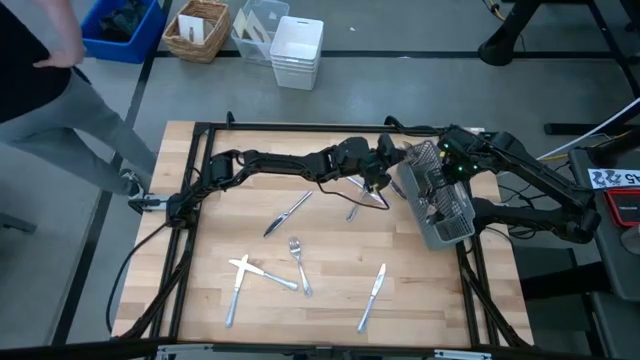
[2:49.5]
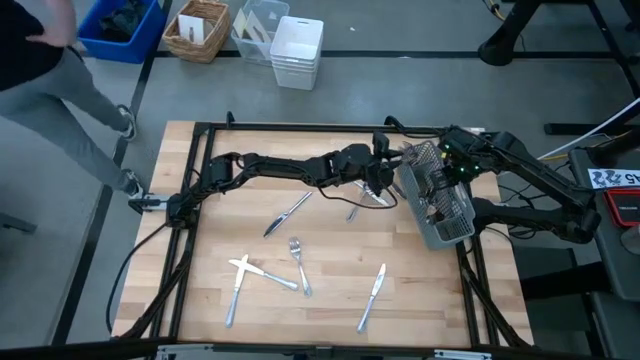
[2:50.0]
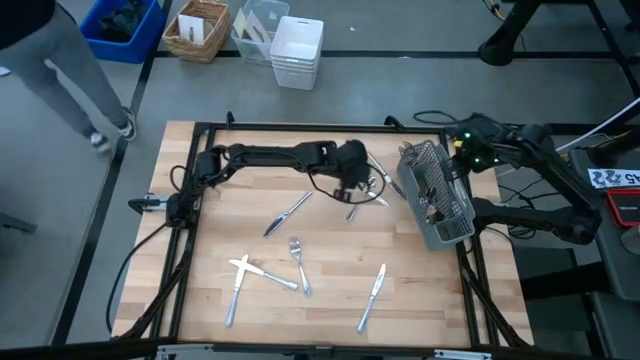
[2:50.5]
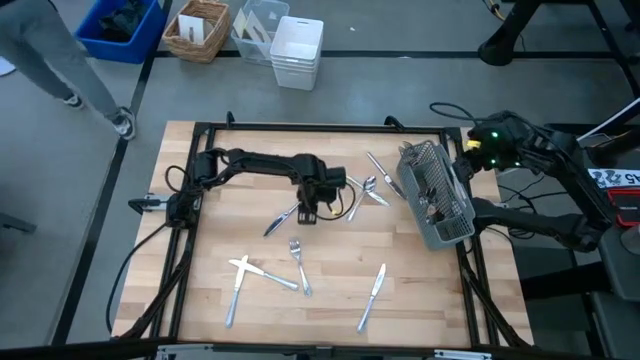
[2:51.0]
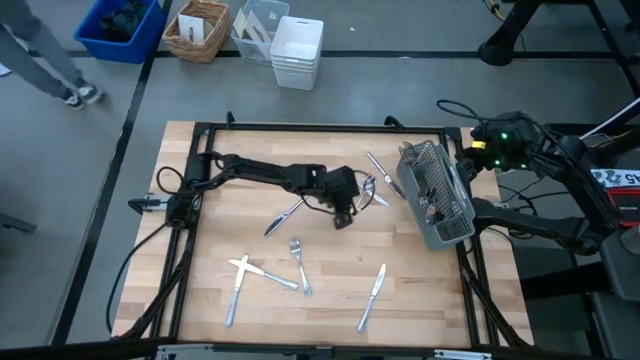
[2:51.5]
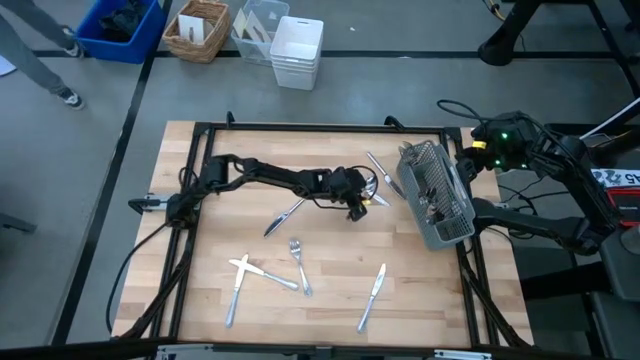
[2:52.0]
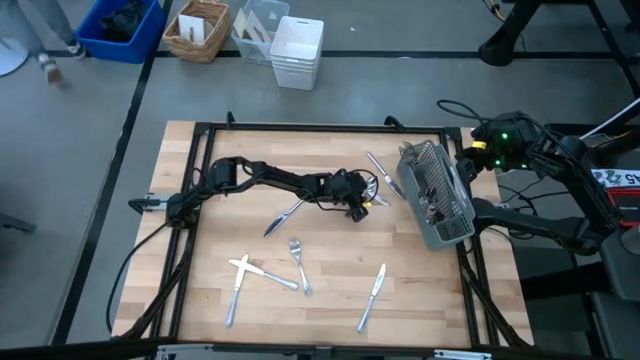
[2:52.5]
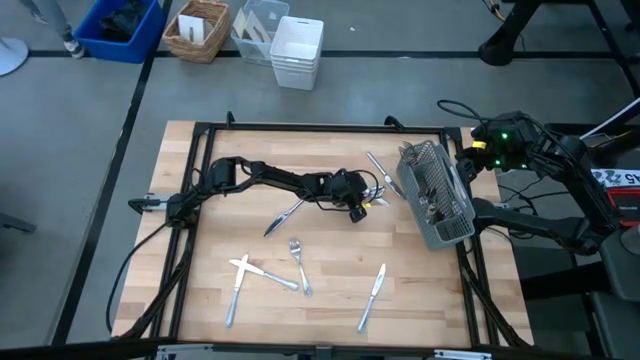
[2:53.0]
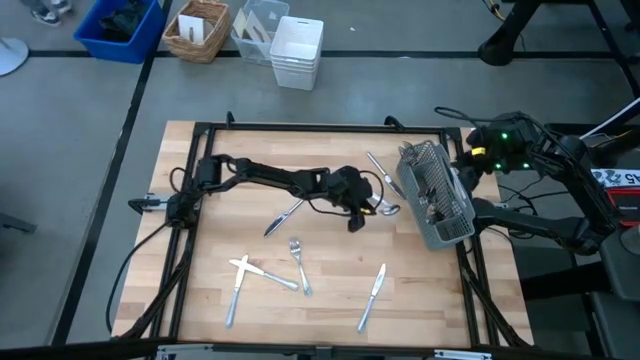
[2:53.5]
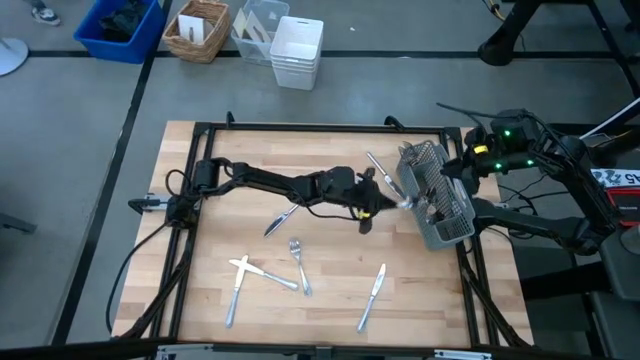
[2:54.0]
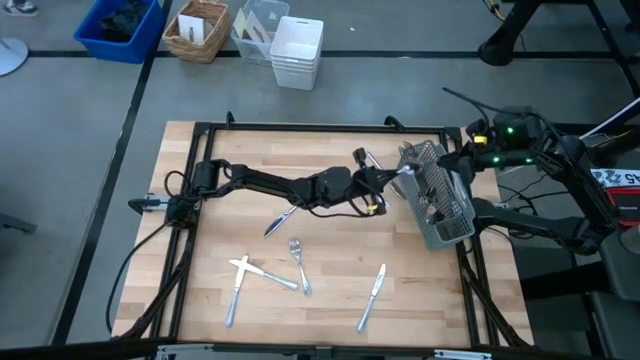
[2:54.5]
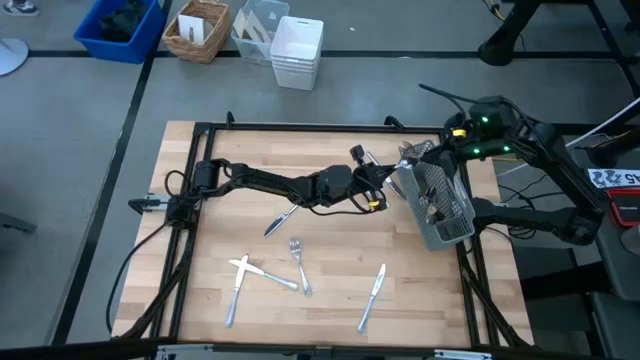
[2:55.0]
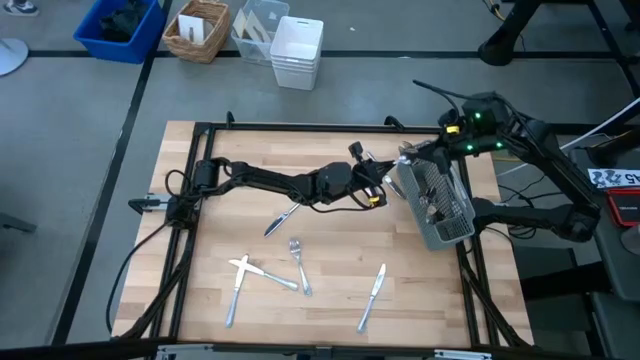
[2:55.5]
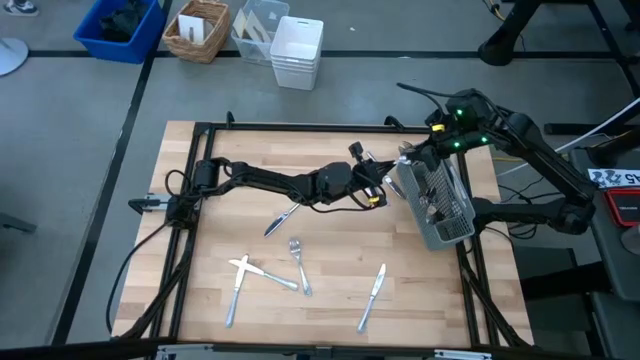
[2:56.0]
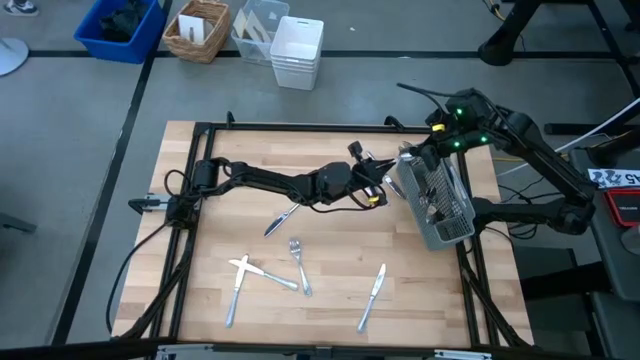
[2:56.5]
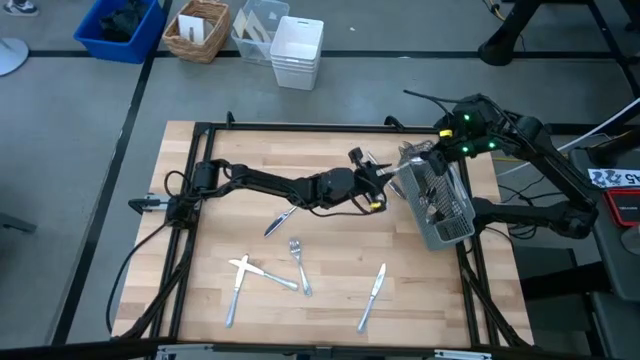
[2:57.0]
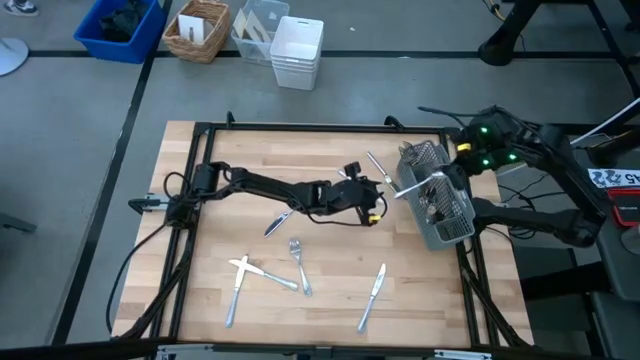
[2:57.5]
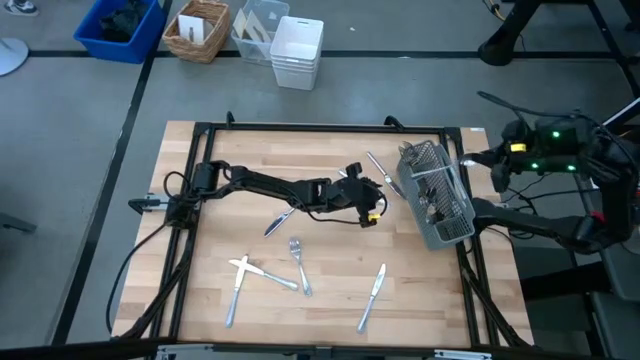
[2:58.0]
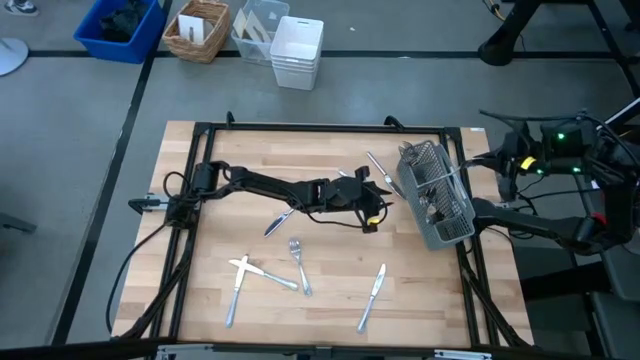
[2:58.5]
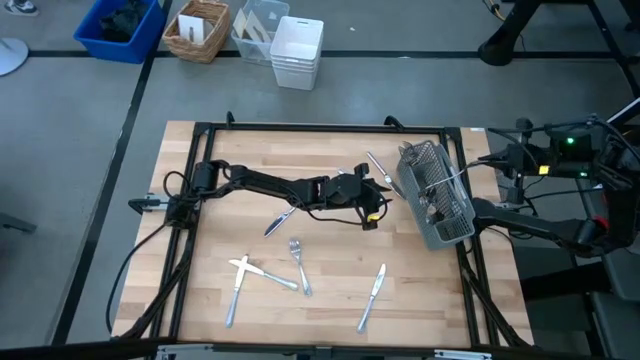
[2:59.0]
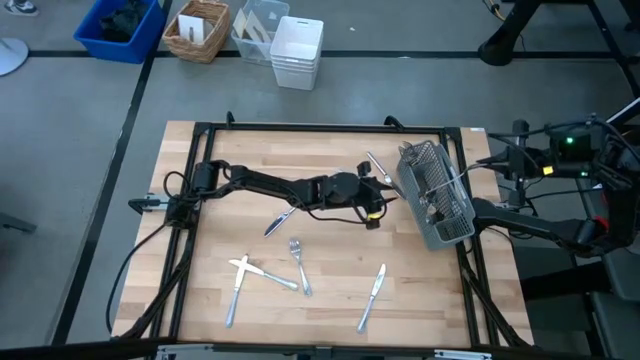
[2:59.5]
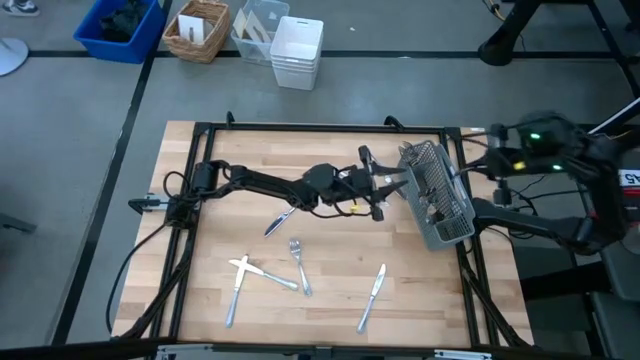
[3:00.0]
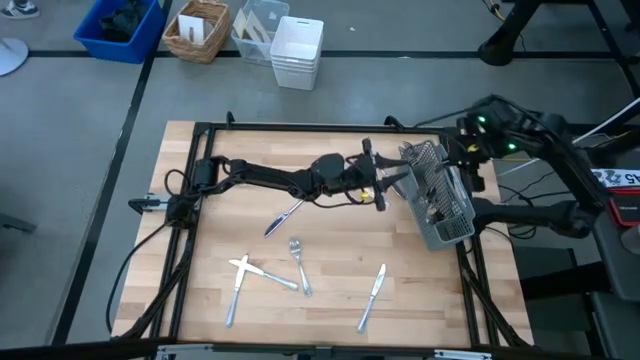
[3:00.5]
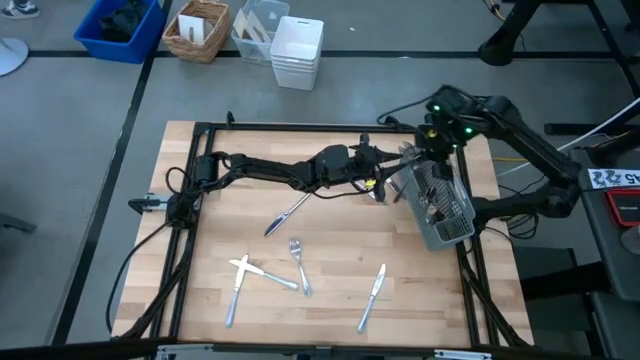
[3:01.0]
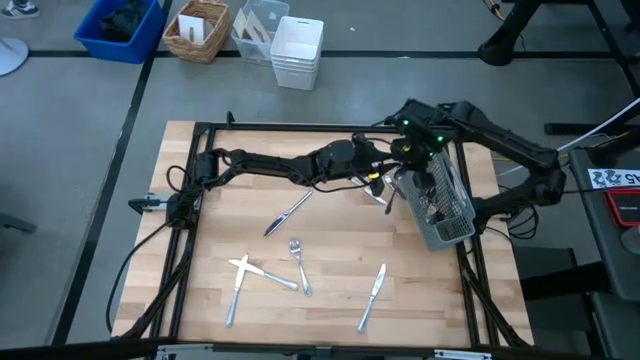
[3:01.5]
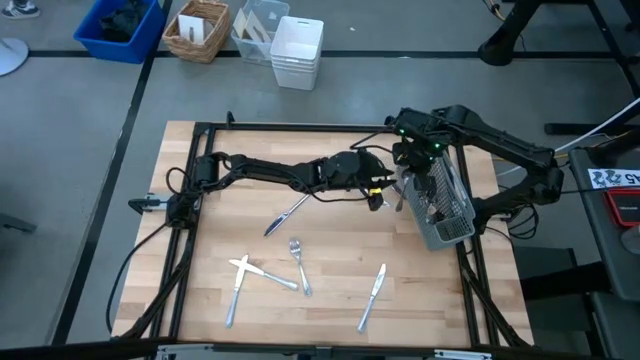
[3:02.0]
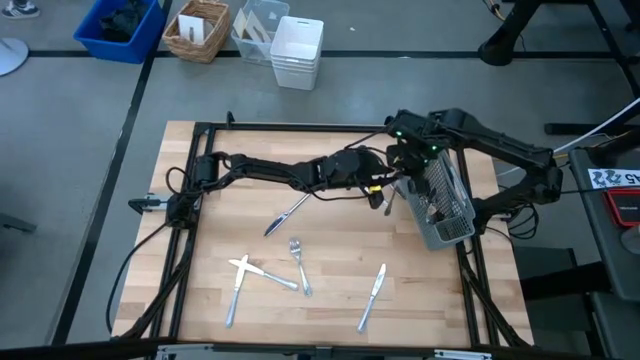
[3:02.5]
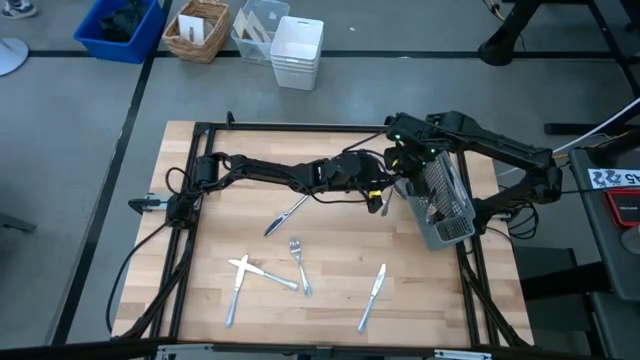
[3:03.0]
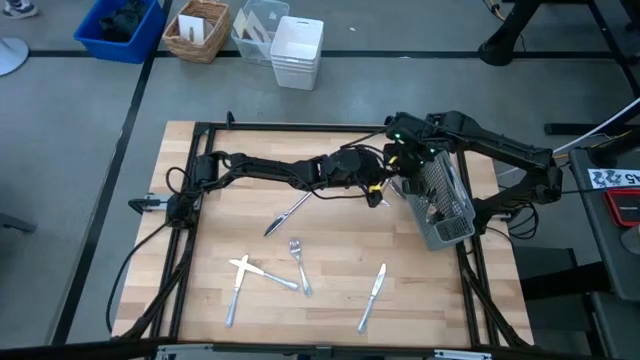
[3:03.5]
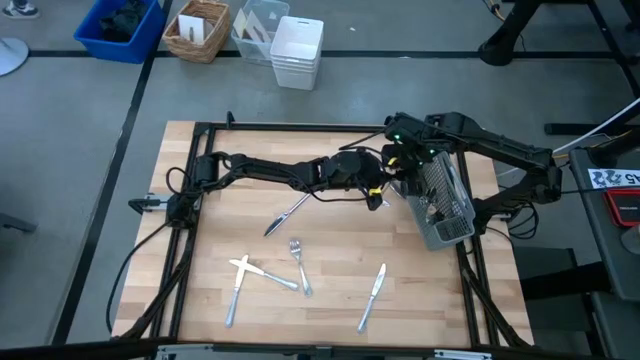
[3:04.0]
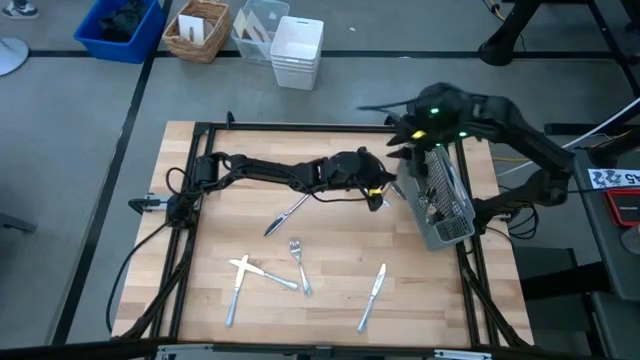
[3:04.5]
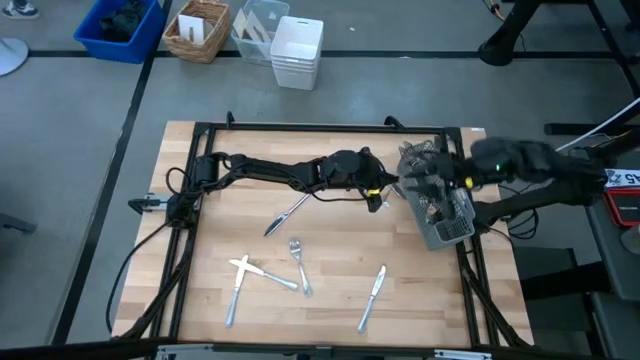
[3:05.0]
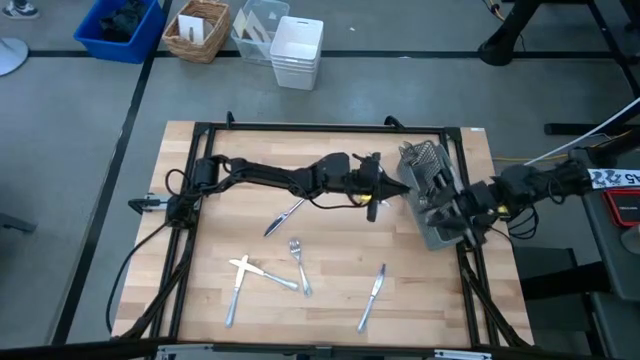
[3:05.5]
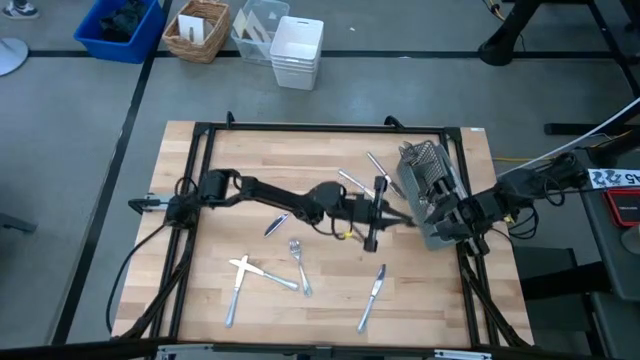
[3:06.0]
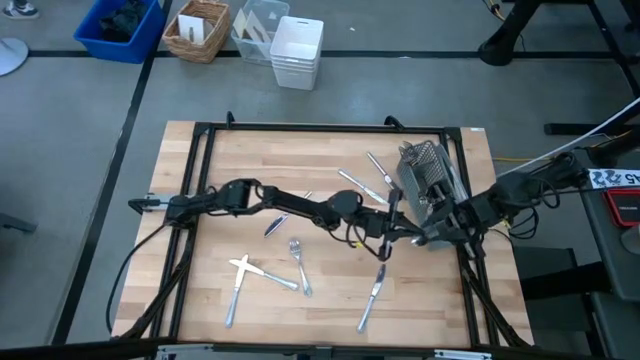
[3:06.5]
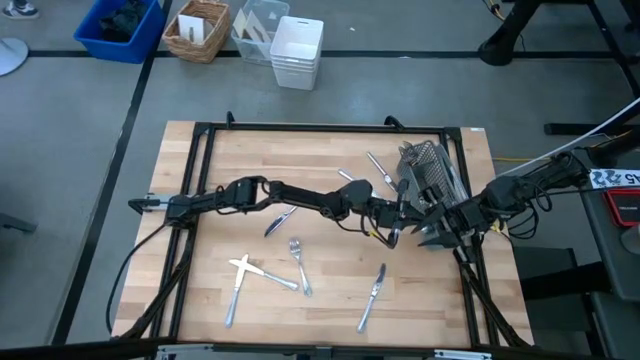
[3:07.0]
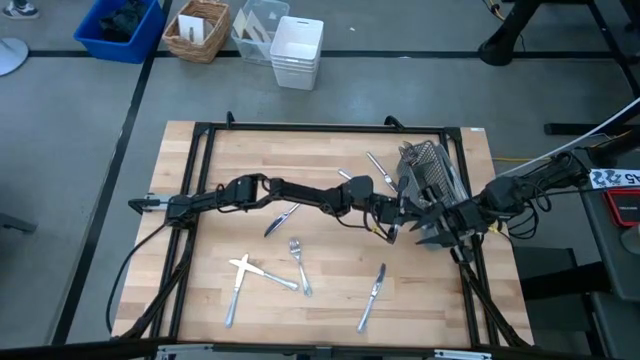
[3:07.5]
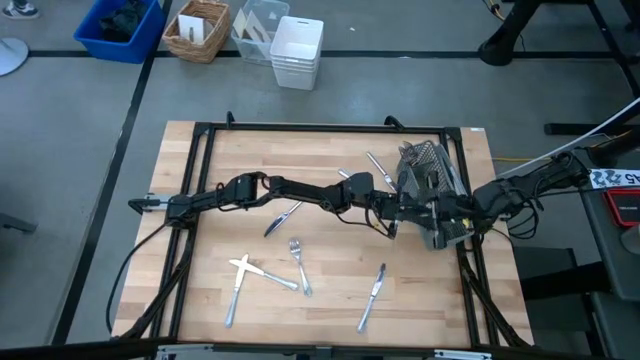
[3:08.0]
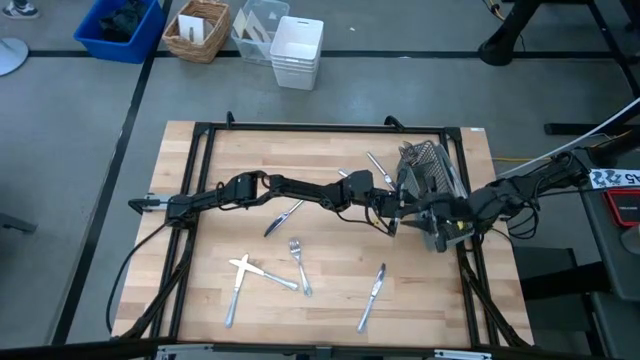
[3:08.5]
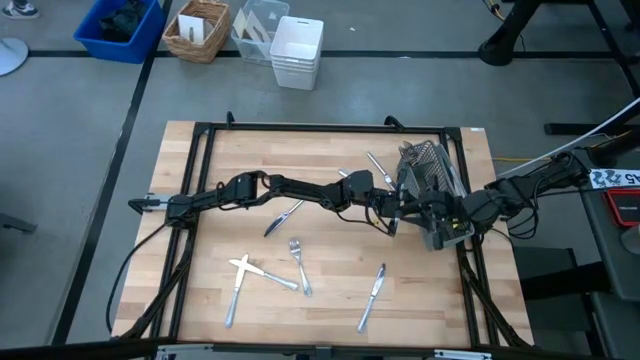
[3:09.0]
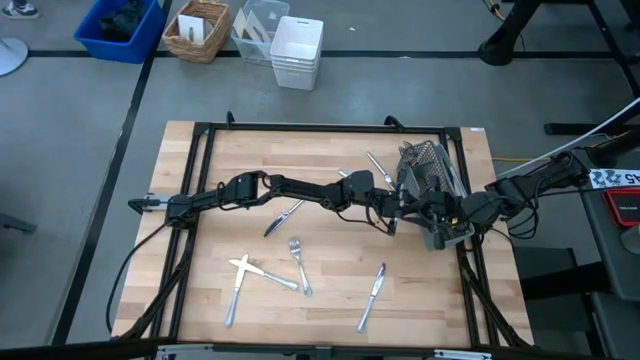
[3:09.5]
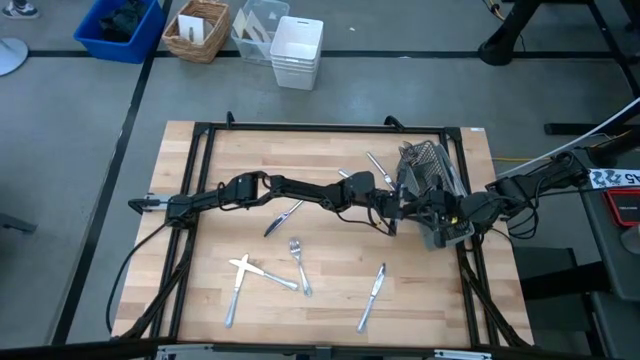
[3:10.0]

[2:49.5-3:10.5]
Task: Sort silverware
Put the spoon into the right section of the utensil holder

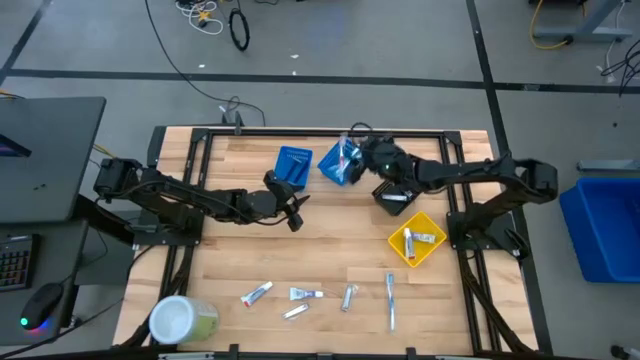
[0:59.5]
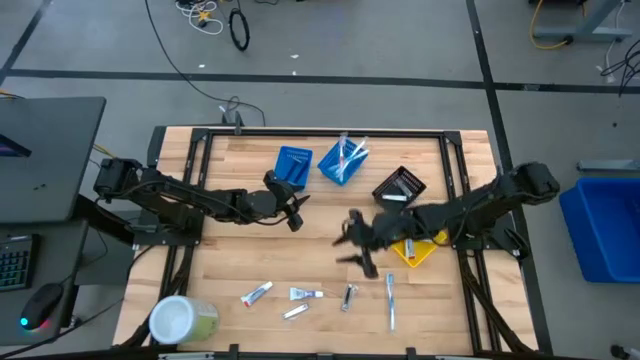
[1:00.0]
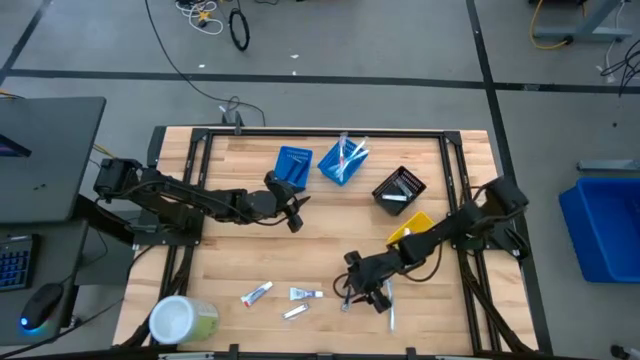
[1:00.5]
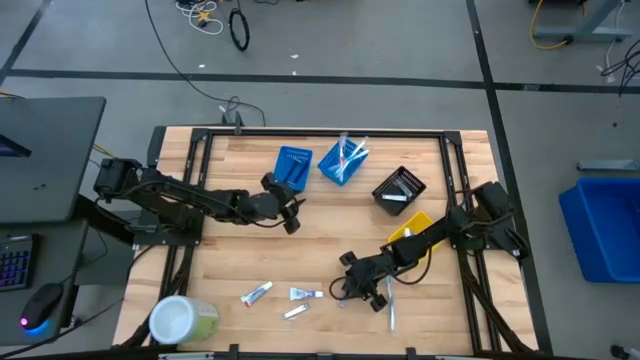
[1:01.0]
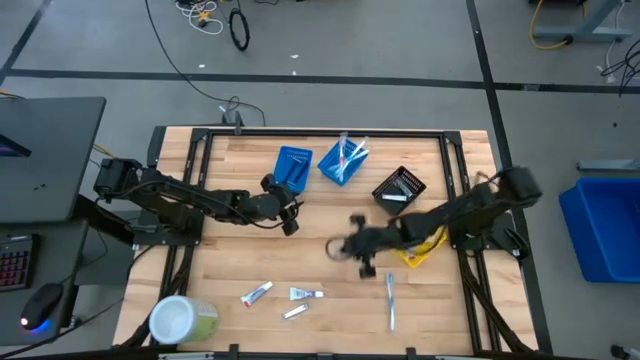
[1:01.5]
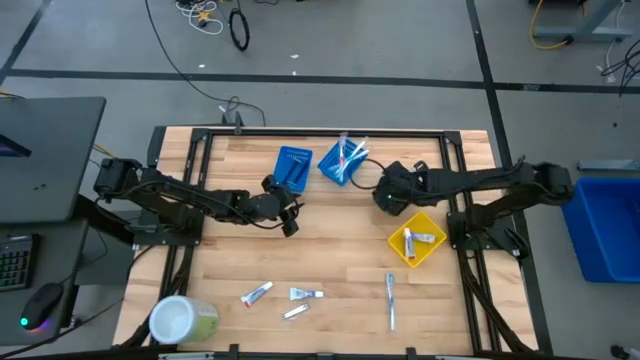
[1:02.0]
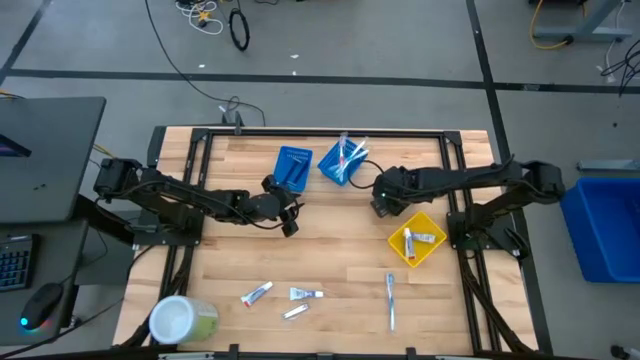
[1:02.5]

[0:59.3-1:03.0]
Task: Pick & Place Travel size toiletries
Put the silver nail cutter into the black basket
